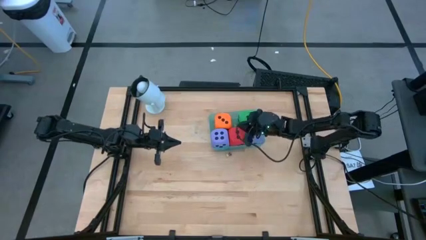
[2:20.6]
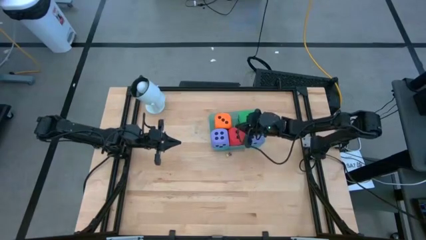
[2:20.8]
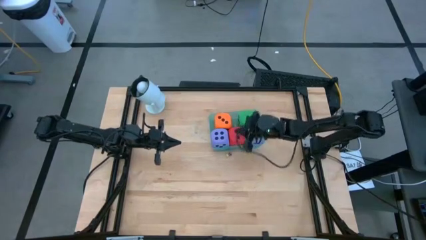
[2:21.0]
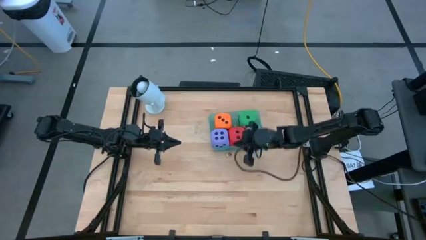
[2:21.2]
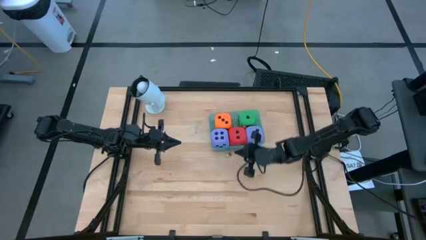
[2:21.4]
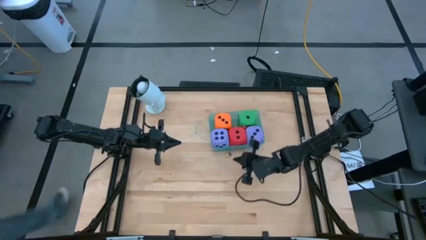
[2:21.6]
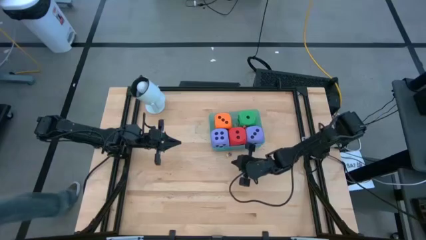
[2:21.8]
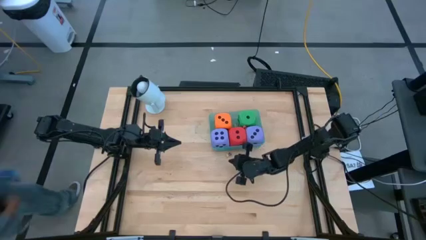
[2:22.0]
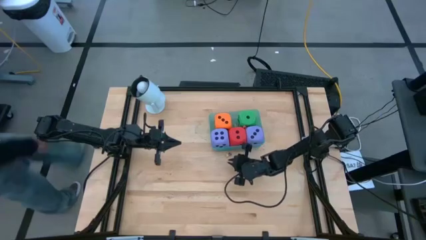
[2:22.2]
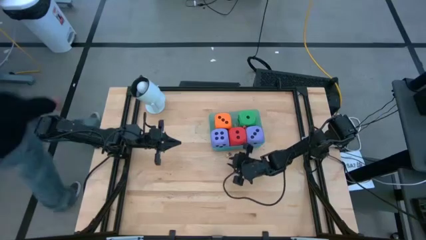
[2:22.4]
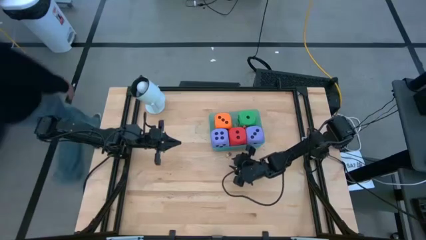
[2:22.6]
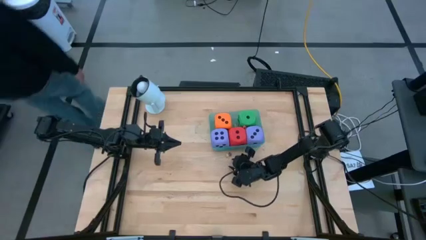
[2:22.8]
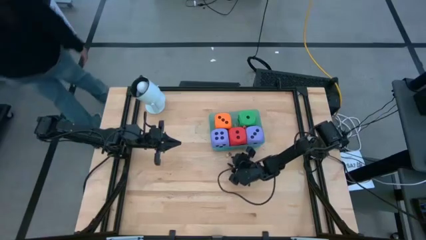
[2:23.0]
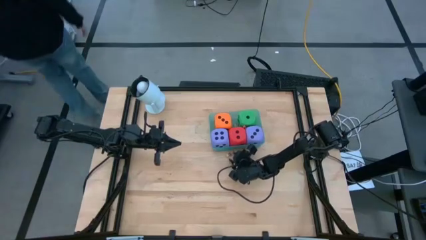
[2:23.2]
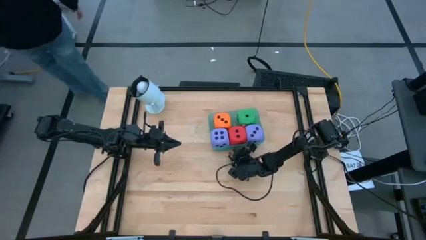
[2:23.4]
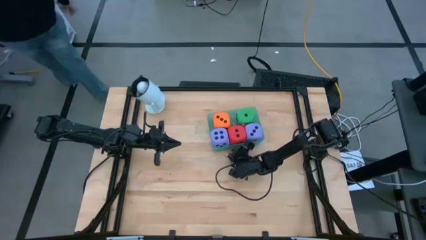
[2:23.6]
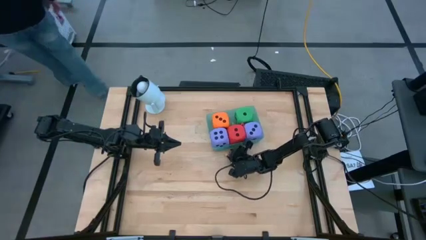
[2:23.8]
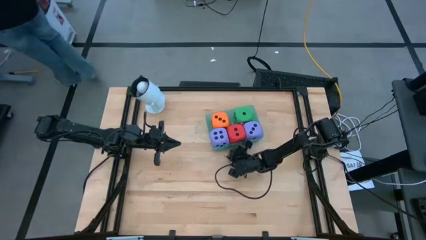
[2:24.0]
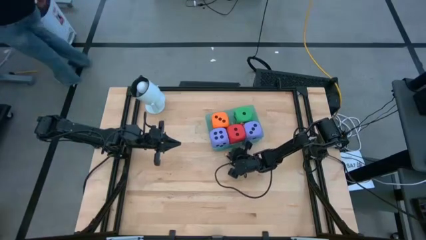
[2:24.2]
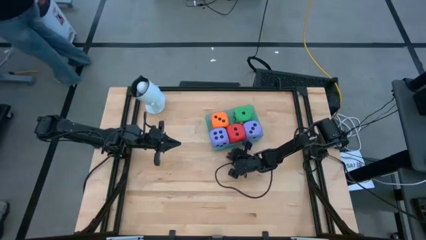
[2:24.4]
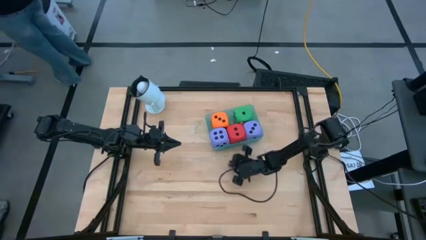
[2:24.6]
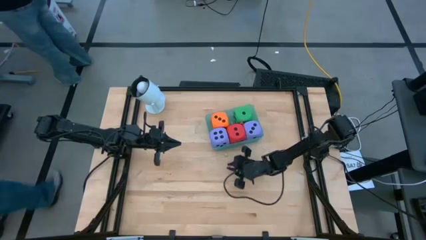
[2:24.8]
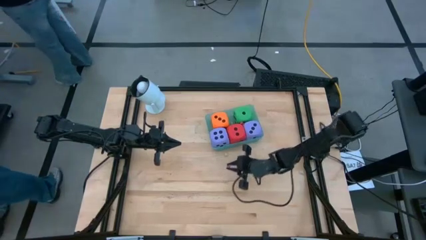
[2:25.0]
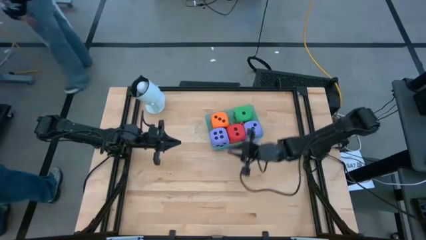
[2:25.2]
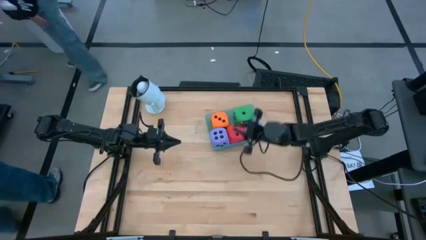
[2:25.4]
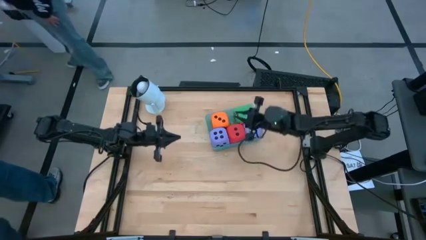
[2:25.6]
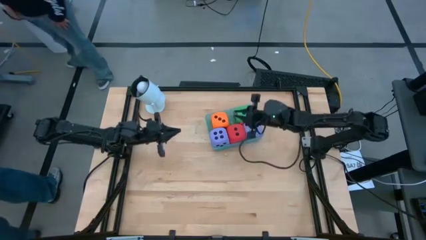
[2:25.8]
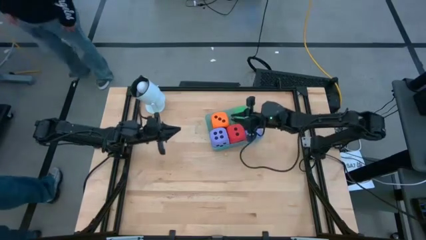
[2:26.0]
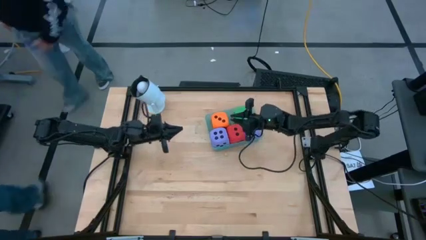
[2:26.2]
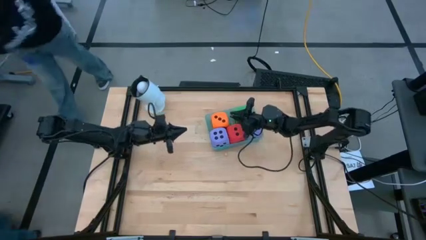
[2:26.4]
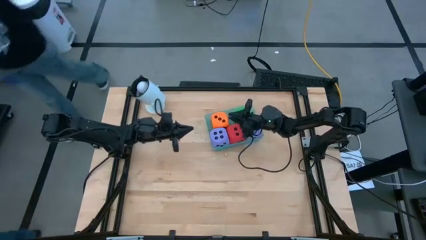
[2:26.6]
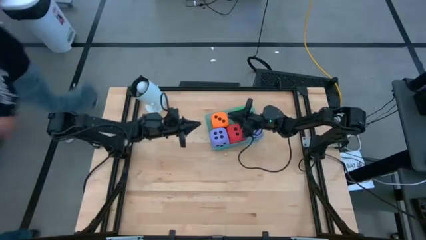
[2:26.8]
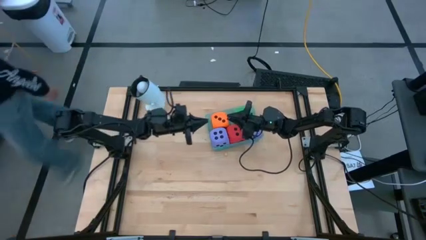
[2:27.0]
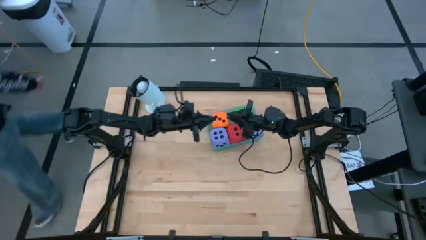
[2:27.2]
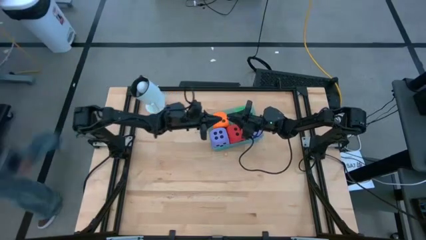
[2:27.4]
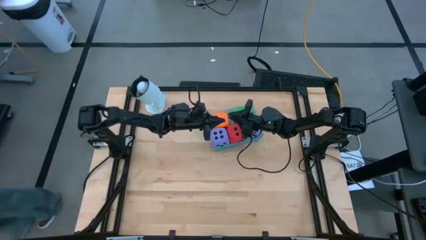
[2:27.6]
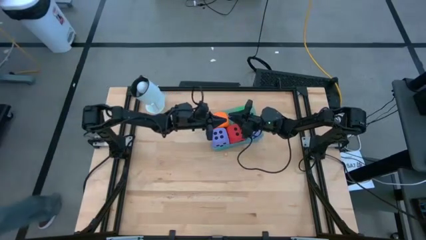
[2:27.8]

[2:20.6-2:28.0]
Task: Pick & Place Dice
Put the small purple die into the blue bin

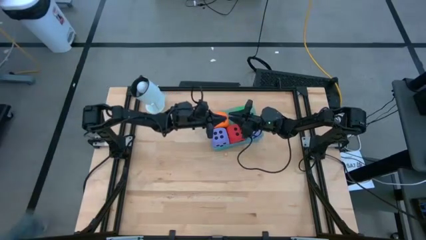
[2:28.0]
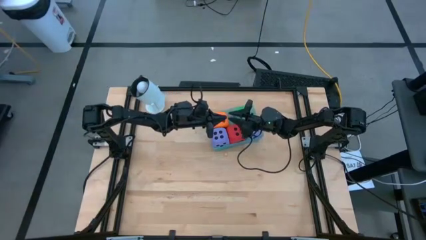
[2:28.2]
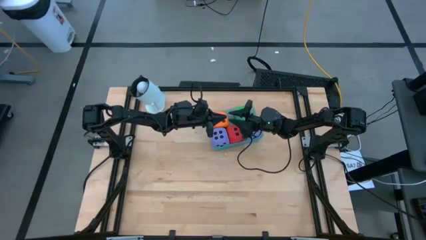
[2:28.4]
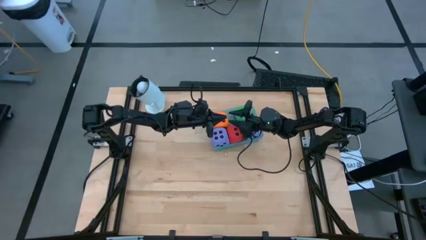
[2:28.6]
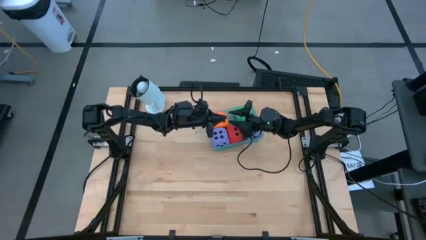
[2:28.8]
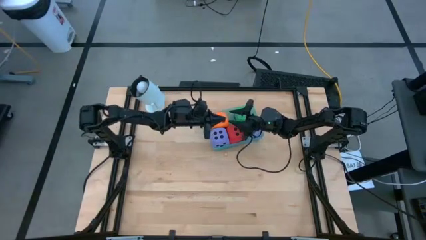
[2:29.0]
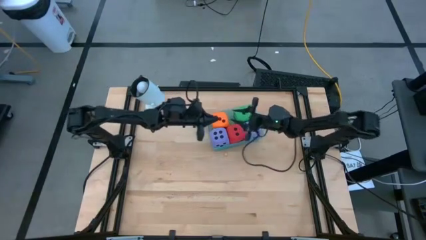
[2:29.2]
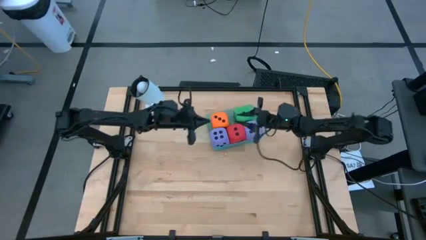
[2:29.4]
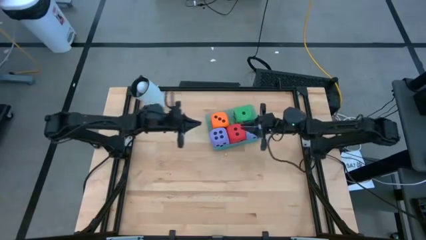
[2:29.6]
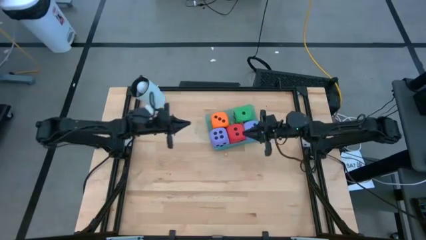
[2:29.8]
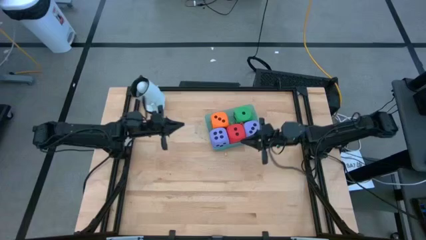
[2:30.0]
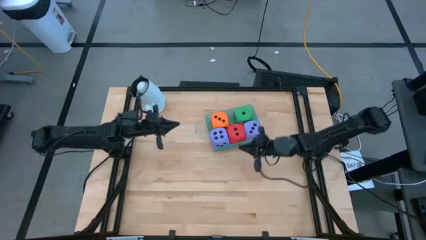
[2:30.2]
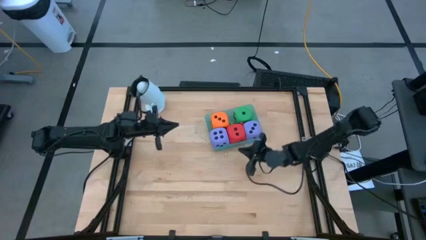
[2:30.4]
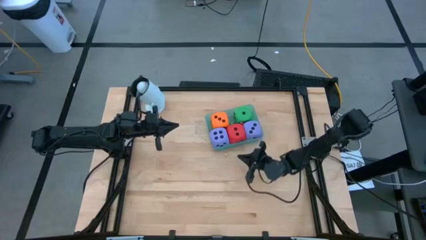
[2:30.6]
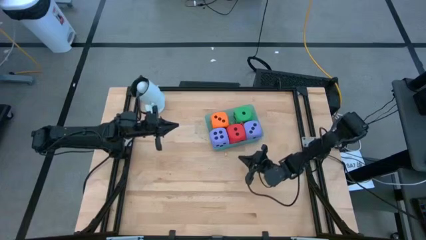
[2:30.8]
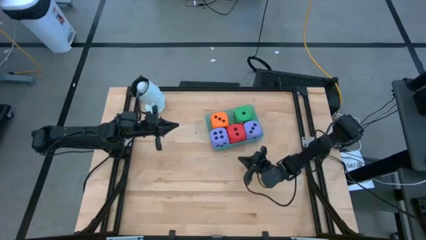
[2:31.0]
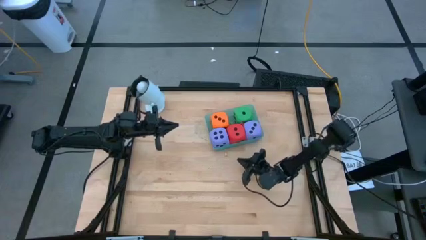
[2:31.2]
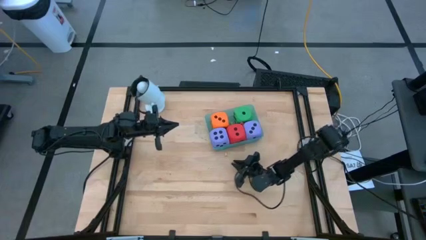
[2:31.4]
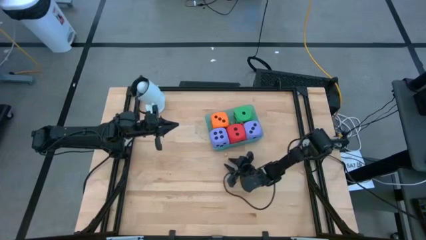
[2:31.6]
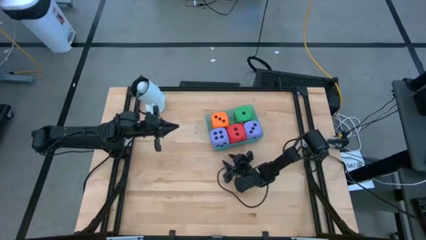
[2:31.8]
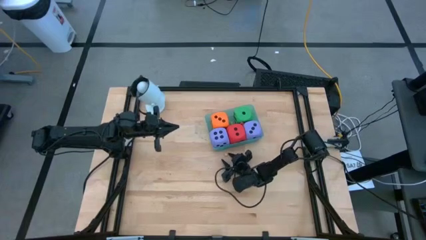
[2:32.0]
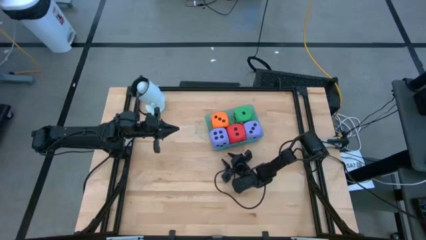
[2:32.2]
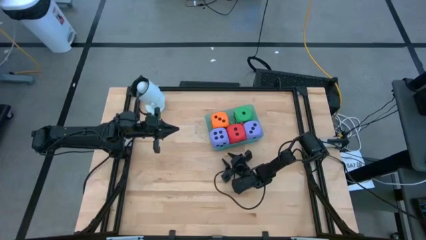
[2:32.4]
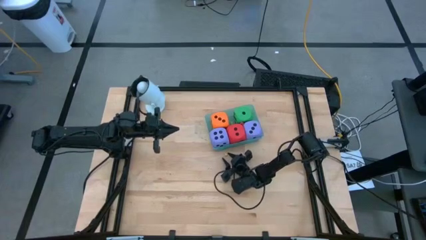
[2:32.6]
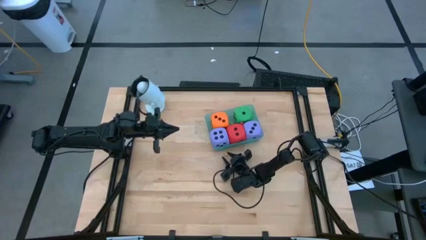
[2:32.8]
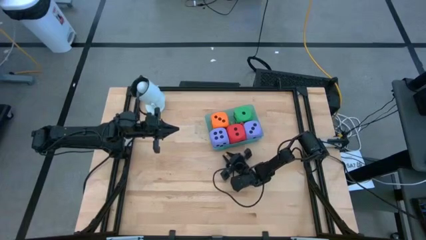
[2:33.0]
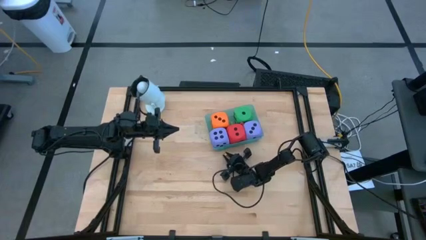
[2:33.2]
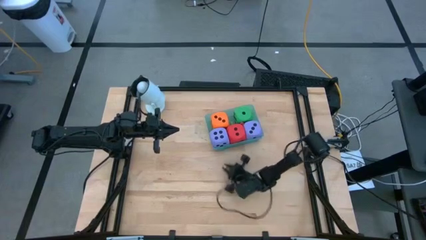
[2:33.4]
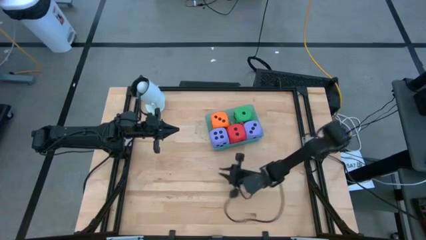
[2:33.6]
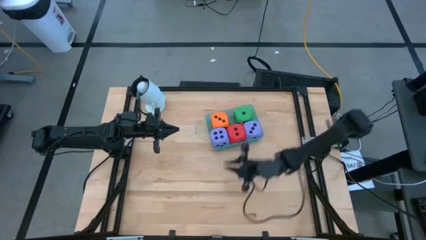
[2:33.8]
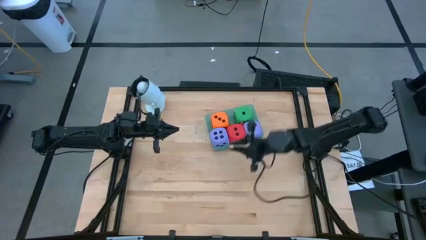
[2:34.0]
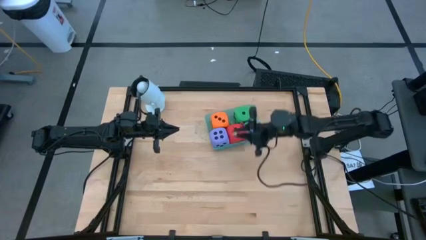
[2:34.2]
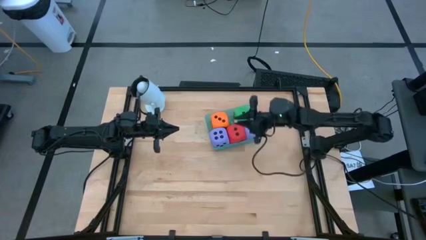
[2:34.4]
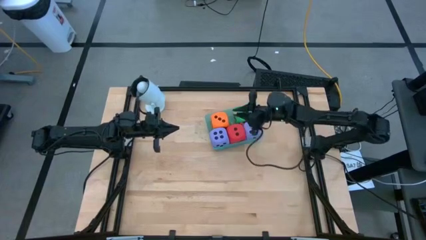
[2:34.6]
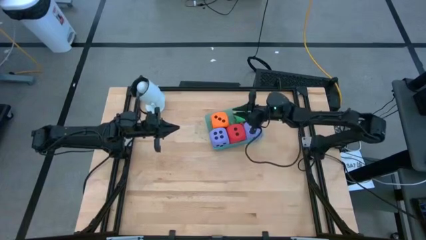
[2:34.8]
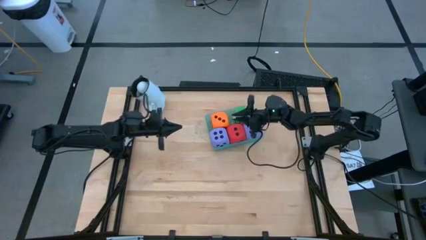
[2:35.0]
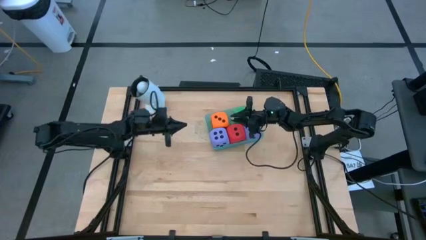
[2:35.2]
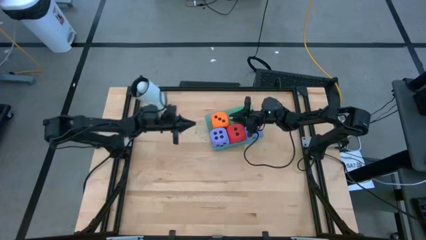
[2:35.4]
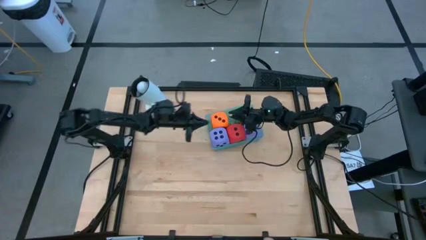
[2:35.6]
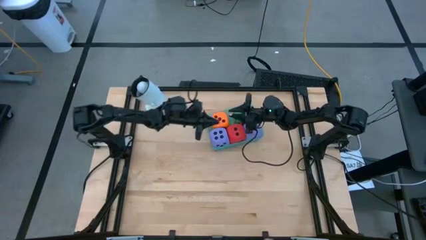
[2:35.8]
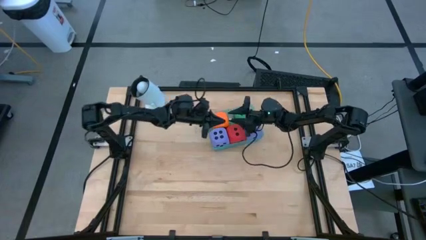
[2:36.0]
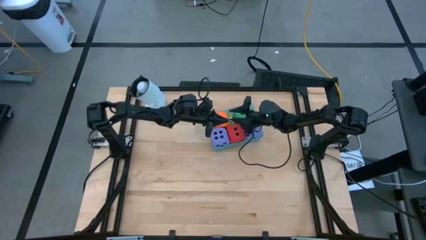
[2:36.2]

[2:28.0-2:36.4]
Put the small yellow die into the blue bin

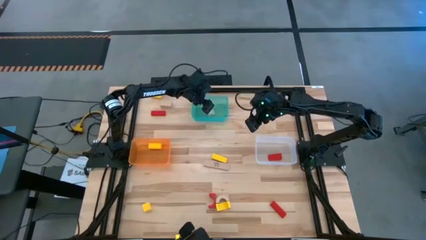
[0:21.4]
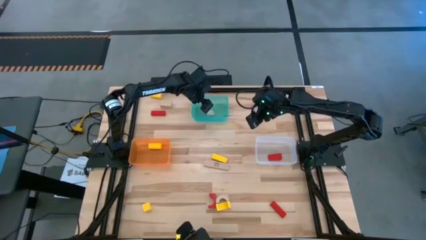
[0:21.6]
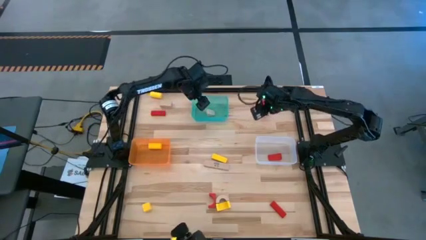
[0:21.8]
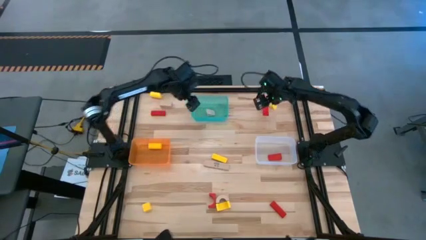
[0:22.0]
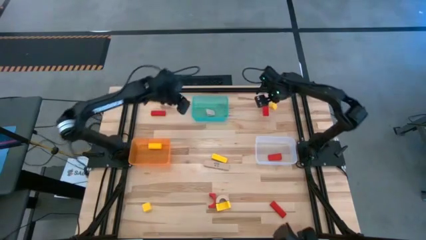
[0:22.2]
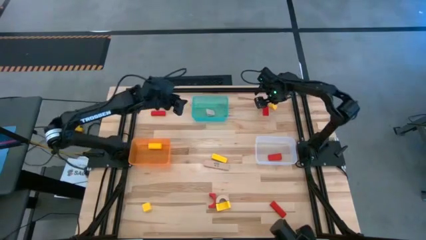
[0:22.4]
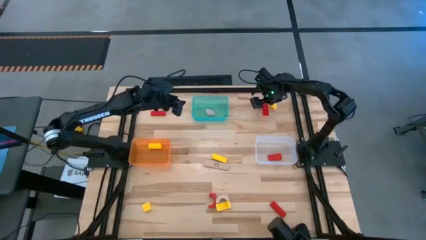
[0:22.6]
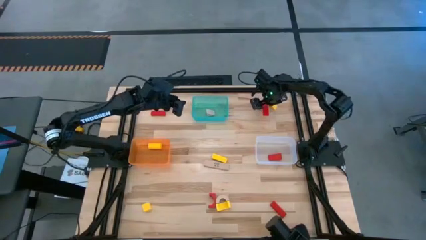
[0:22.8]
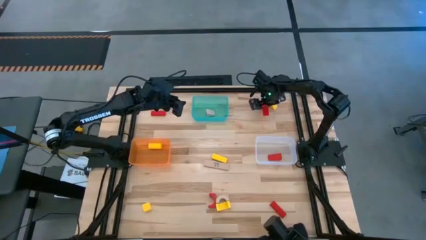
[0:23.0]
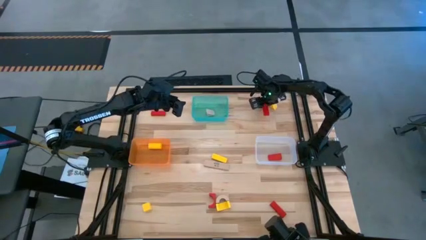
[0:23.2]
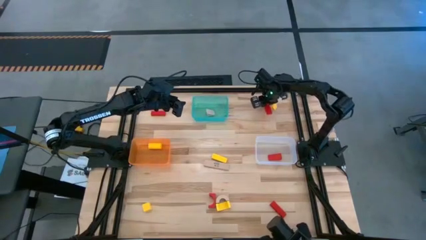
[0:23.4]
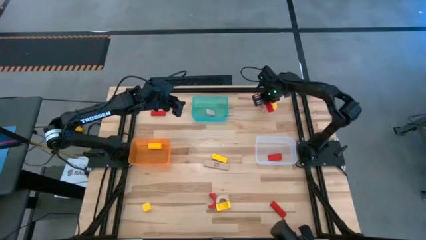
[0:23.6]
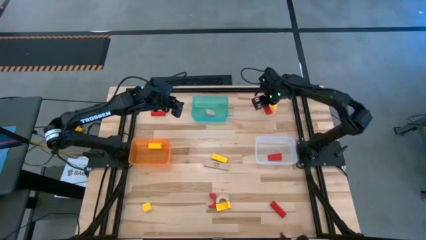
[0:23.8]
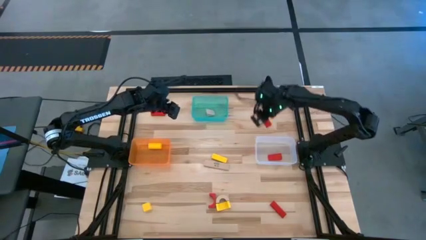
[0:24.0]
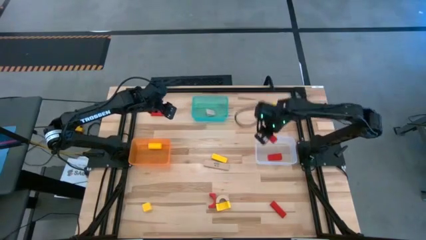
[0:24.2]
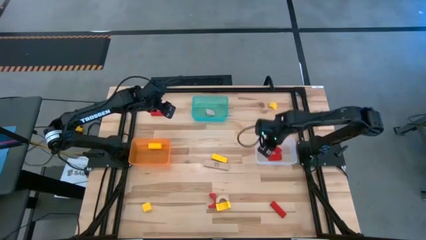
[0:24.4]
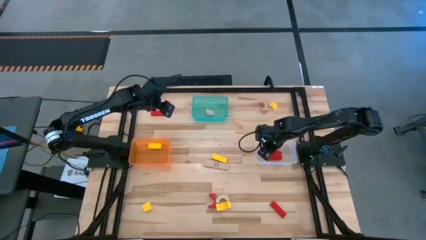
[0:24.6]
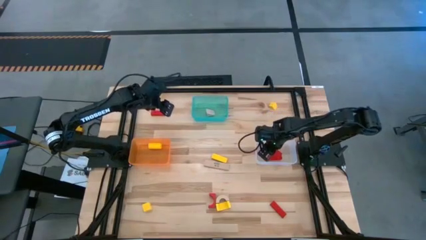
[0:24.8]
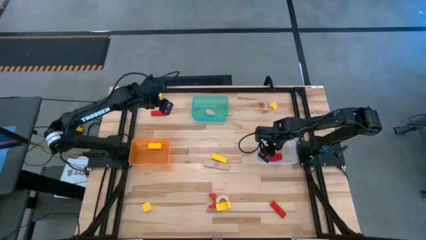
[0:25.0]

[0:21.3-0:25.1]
Task: Sort & place blocks by color
Put the red block into the white bin
